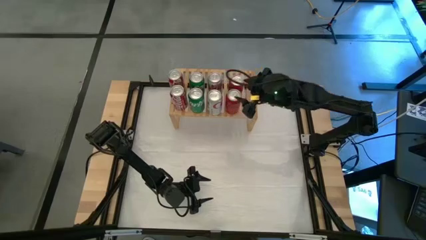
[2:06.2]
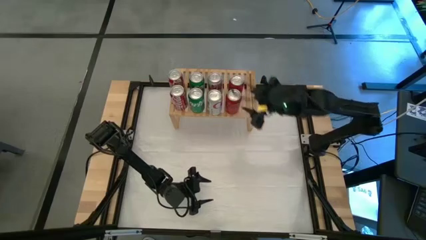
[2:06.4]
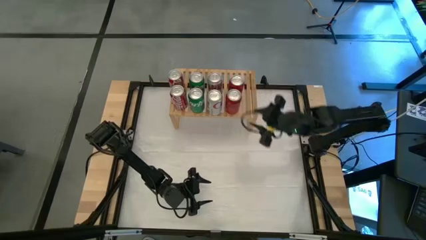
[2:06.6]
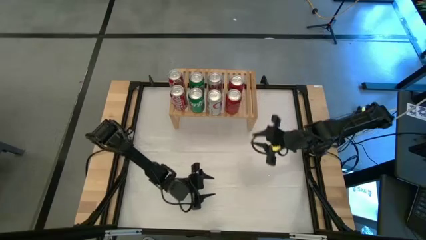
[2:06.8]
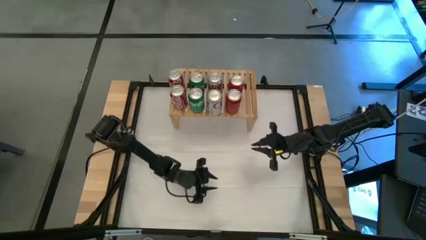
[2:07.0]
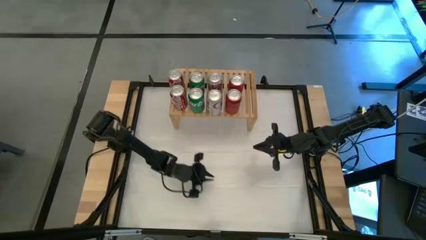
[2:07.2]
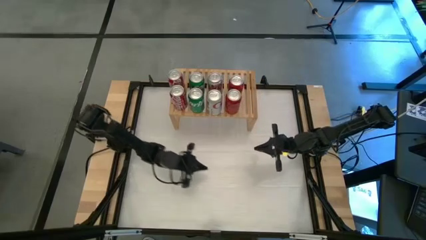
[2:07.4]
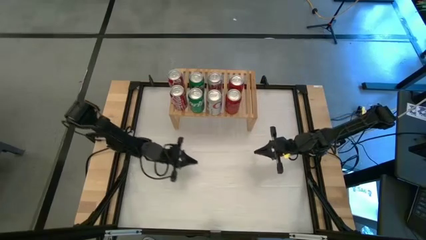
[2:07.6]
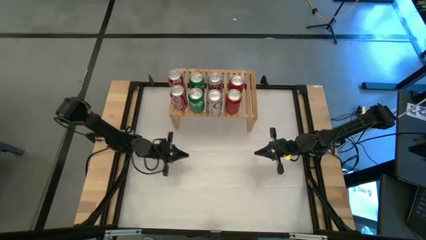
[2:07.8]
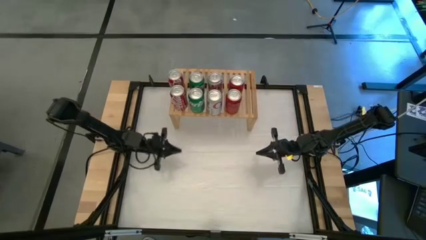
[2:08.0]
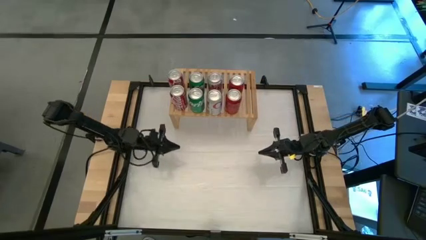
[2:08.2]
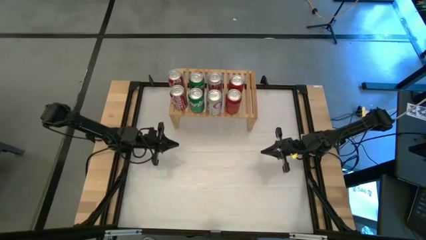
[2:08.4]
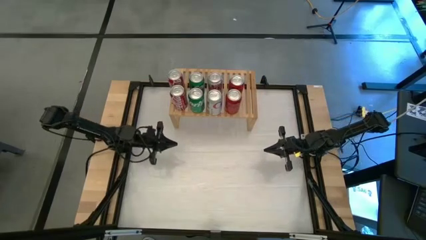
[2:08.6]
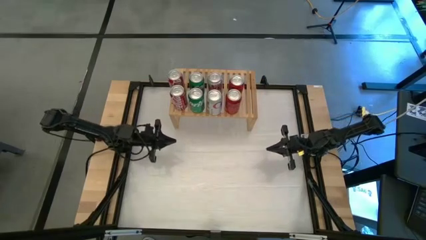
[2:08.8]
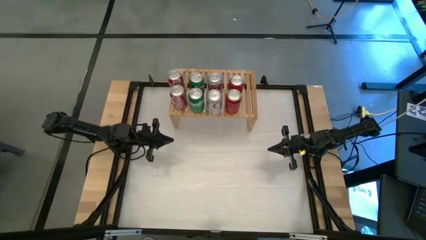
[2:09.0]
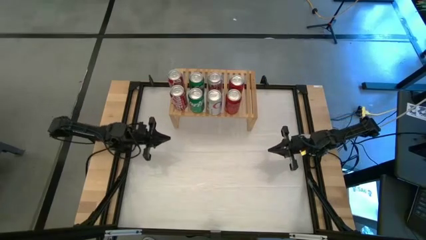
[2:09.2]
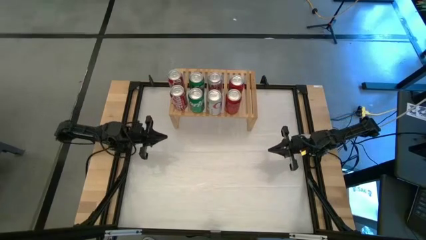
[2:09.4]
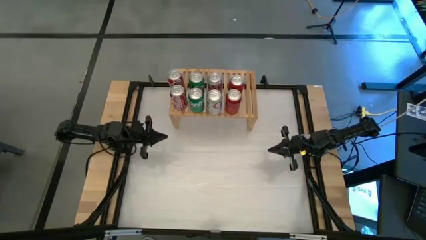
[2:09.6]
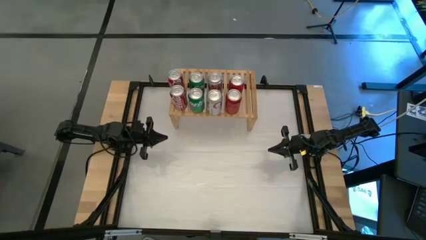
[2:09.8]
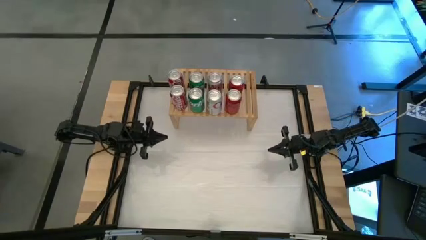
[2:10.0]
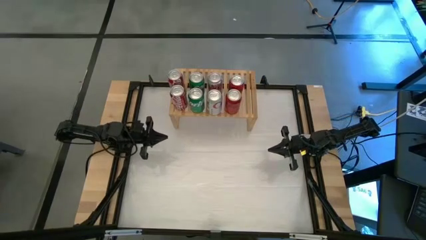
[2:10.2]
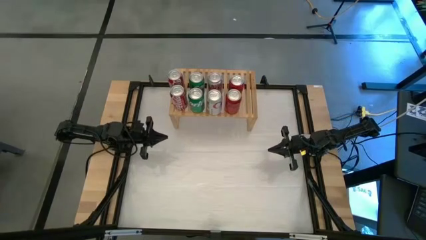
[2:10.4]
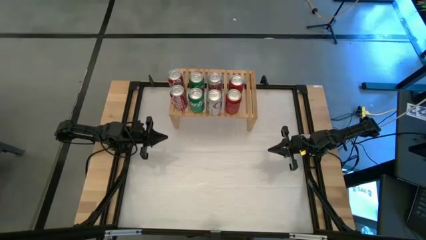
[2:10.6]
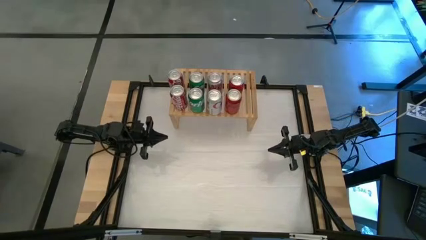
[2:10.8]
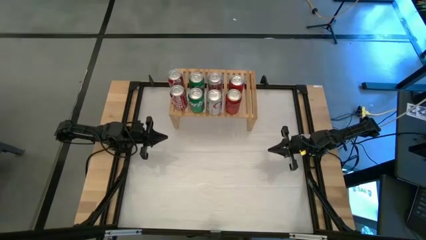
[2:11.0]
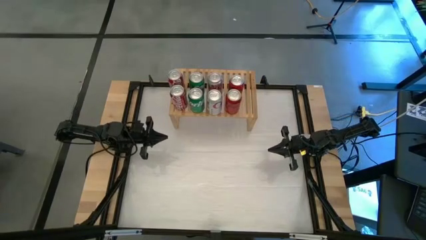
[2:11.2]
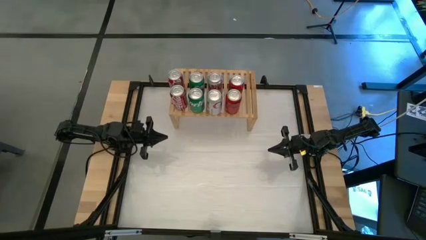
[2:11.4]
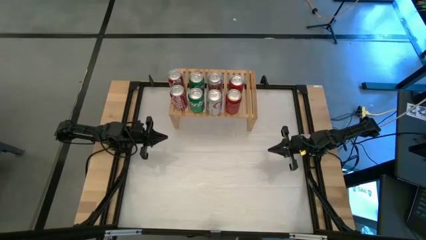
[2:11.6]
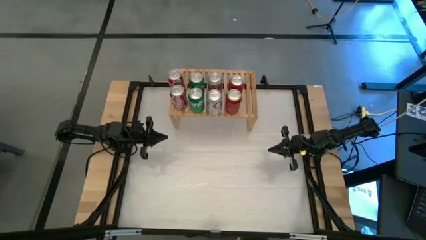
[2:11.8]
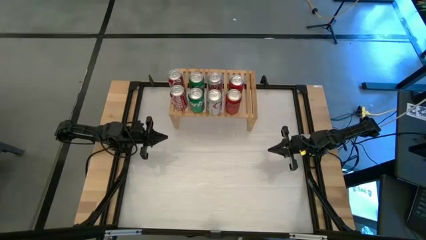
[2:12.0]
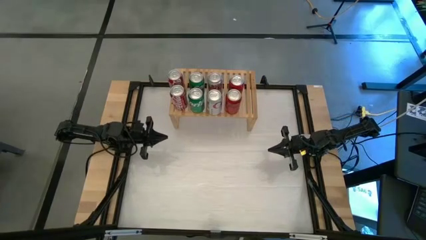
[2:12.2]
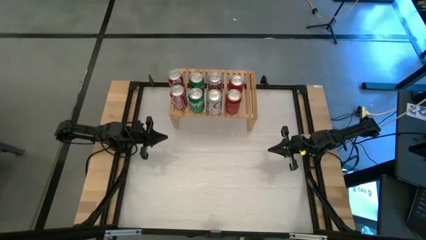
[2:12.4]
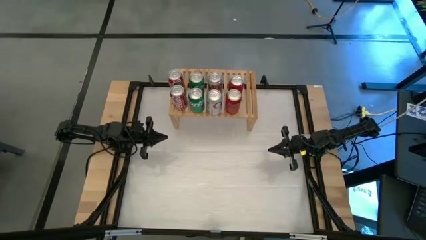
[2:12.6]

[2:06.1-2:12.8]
Task: Place canned beverage on shelf
Return to Home Position

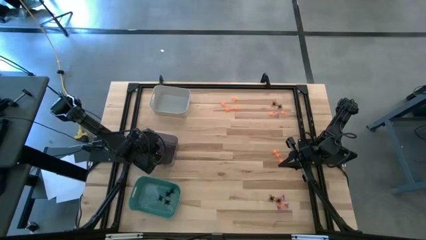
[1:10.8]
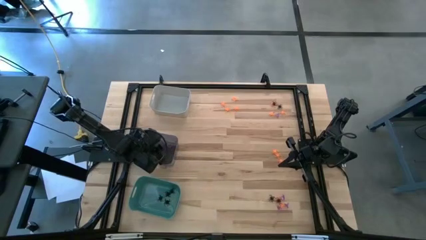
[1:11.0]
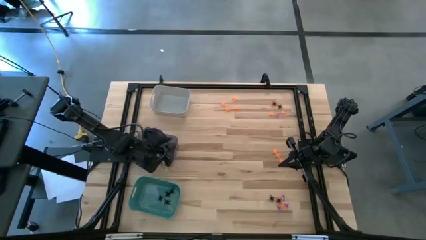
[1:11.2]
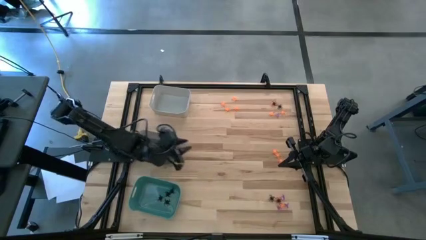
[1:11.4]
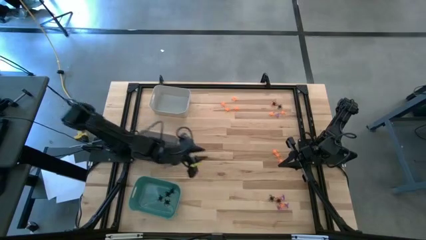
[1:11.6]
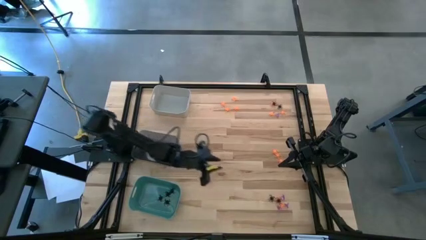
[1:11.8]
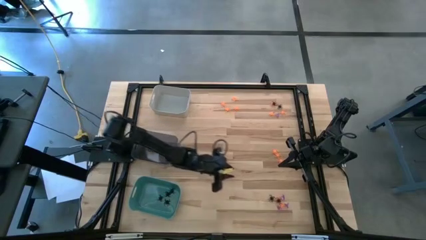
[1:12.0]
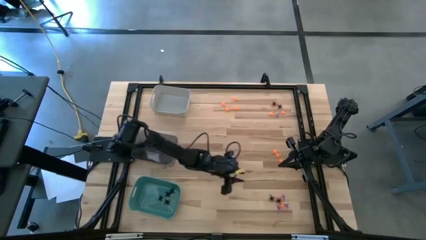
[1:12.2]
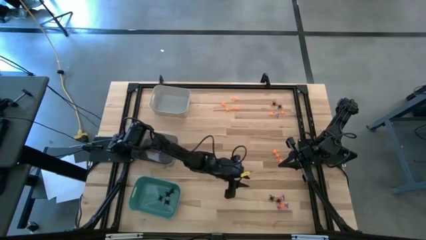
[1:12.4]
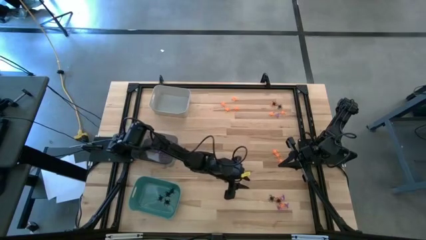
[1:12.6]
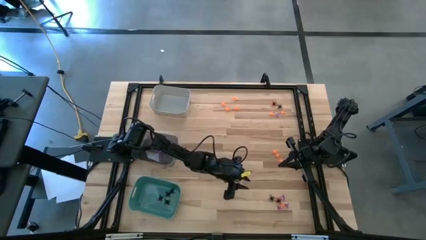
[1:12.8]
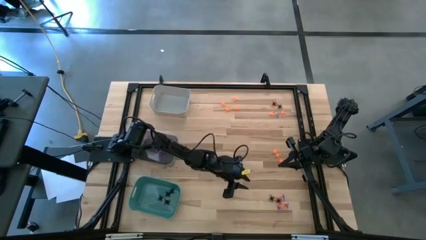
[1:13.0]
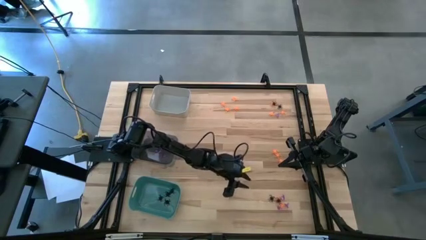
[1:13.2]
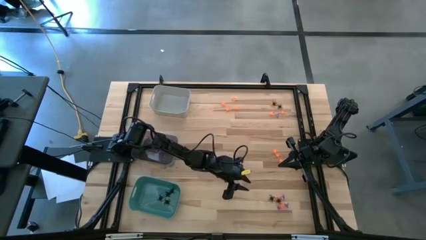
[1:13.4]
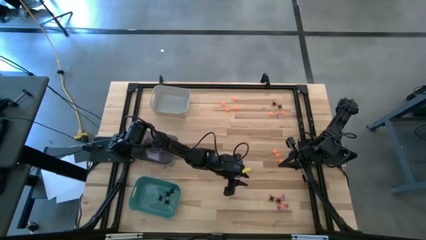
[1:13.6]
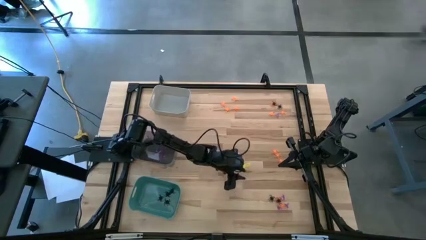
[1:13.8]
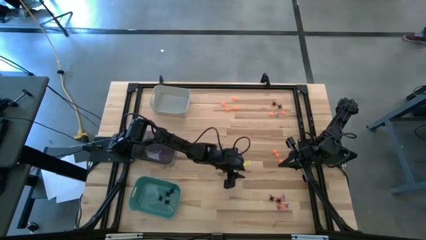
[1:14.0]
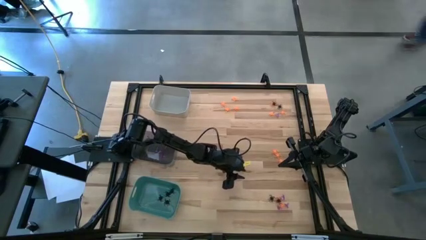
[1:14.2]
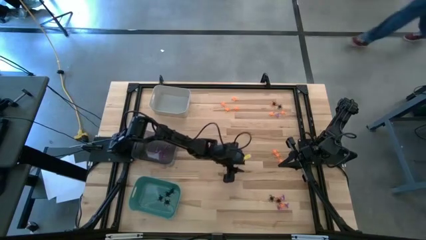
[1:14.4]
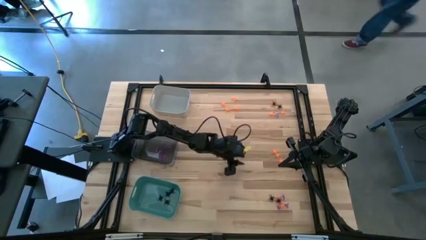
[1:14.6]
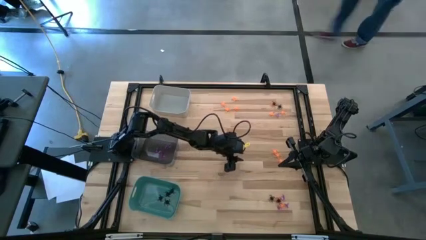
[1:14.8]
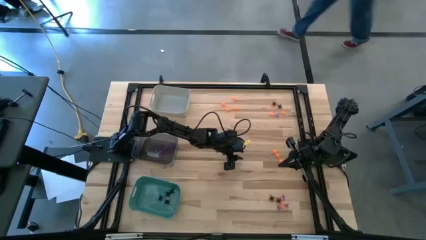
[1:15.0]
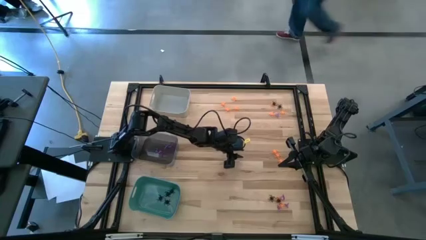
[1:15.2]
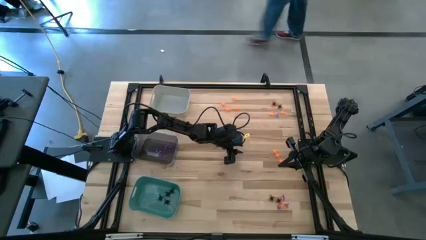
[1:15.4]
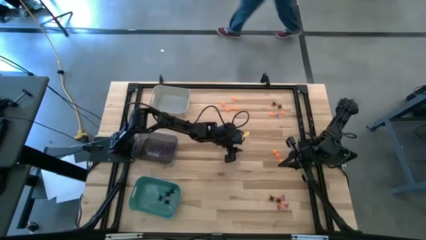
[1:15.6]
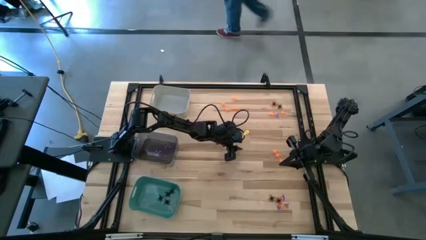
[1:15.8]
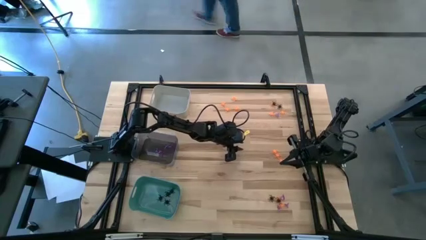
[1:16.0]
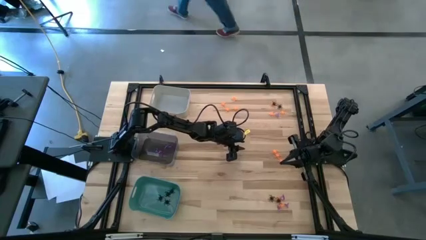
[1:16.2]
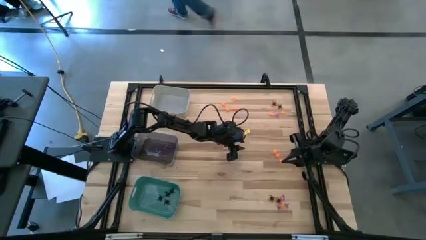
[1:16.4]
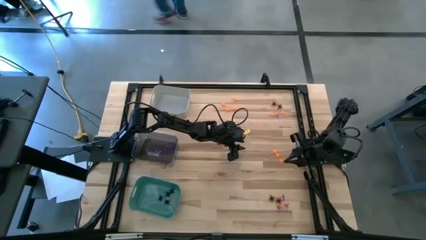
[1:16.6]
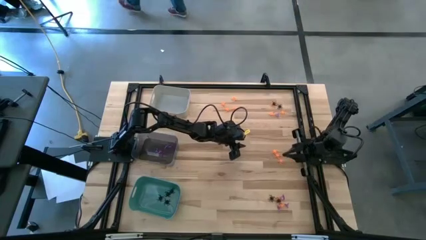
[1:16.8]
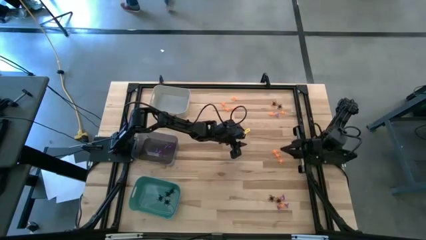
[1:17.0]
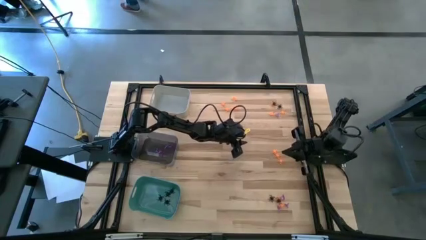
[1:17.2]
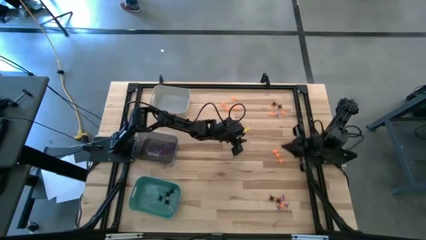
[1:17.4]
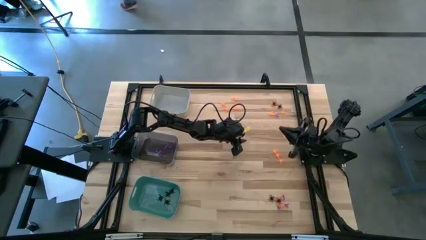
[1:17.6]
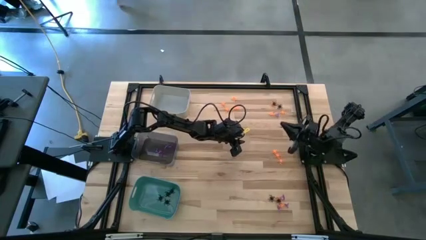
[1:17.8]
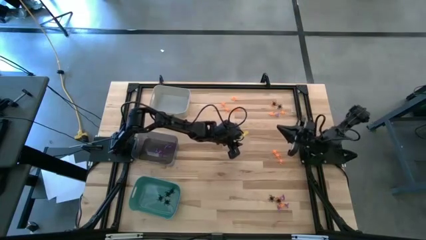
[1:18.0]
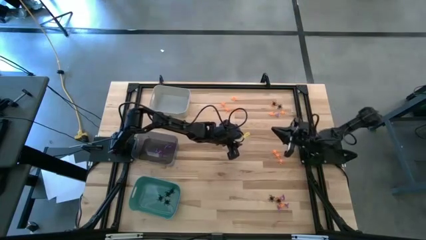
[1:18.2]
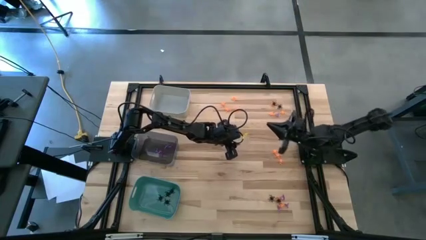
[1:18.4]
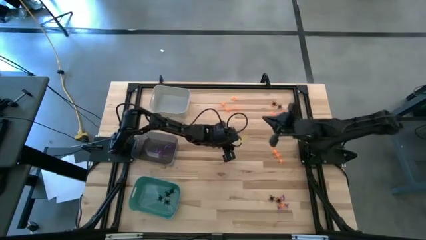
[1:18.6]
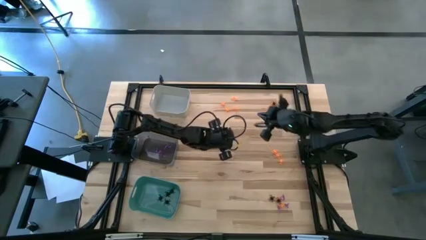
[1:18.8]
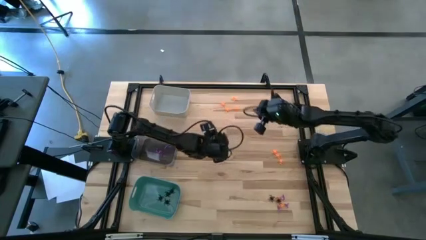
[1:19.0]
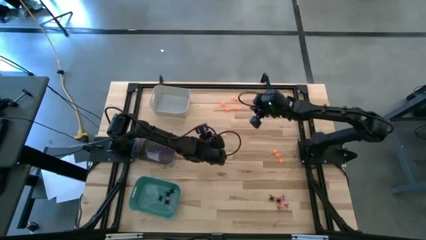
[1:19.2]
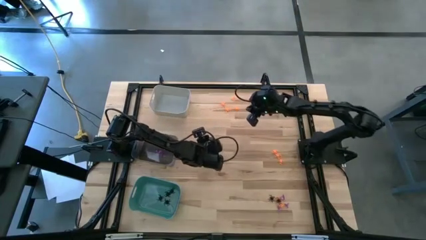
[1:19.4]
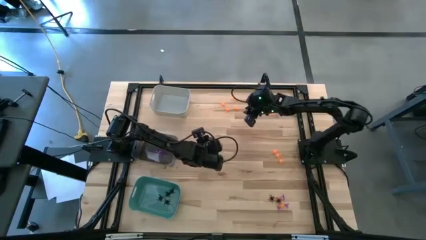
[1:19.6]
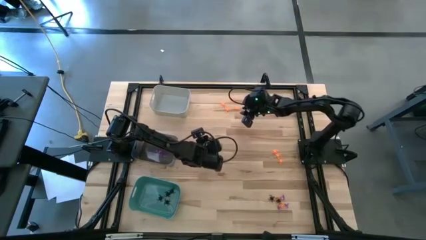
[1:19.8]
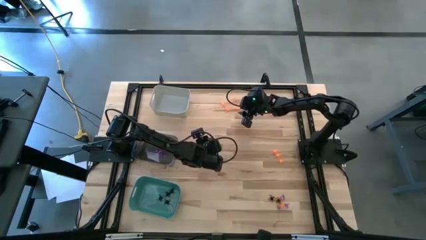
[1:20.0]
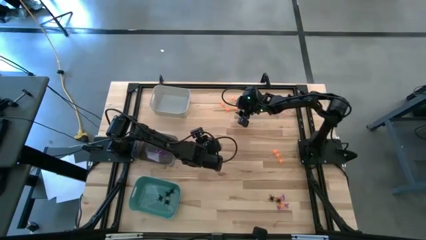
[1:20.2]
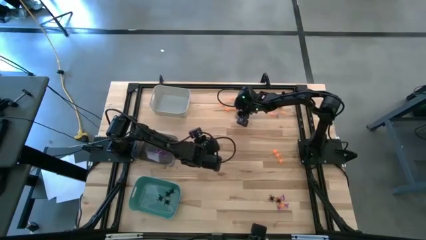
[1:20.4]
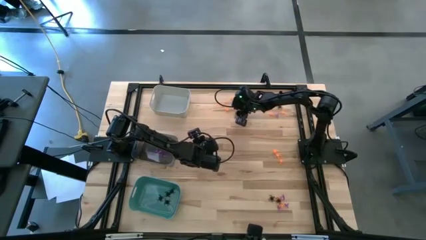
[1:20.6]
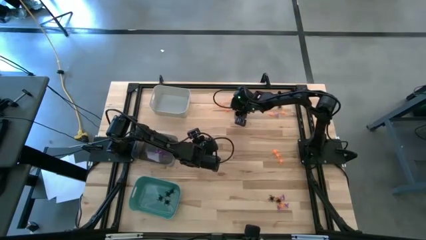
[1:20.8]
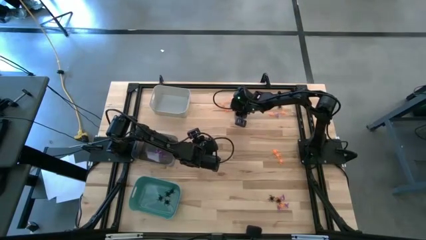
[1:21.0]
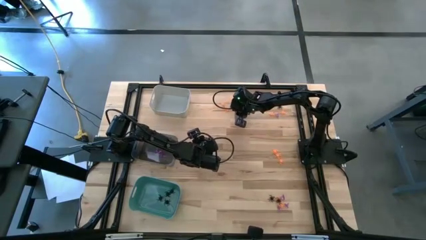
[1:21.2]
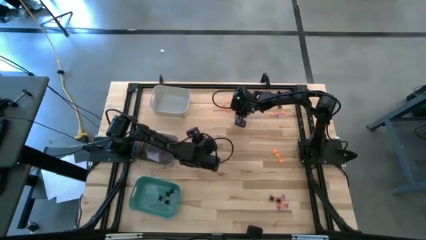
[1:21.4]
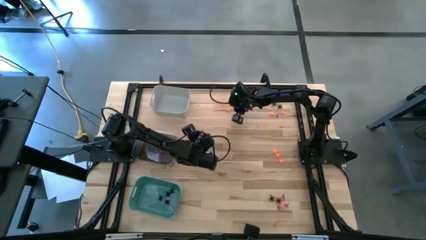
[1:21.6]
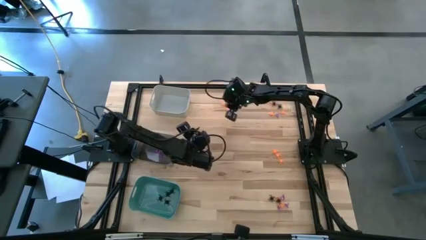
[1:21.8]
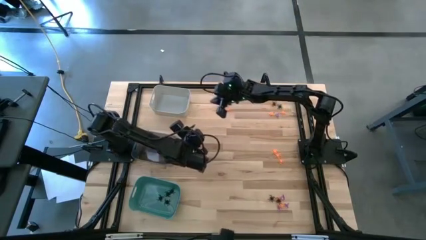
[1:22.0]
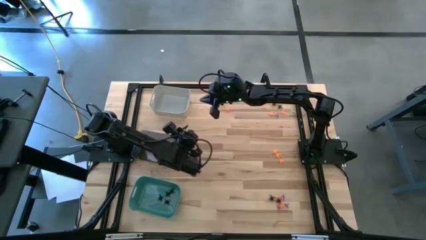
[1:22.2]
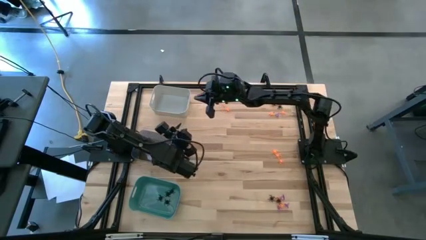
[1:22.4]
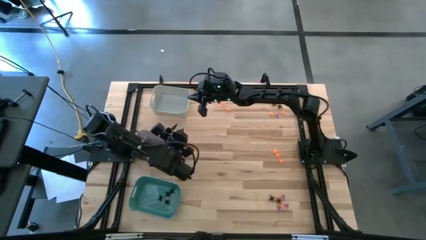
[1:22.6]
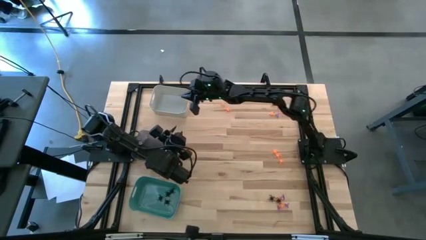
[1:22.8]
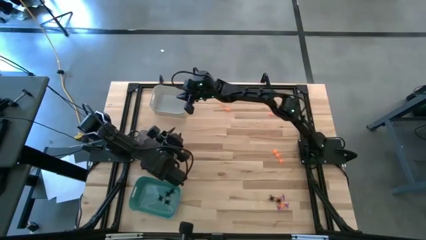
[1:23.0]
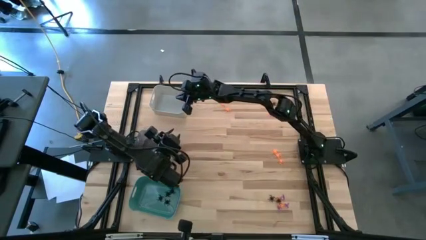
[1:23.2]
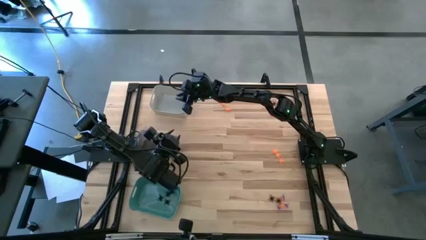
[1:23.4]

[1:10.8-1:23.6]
Task: Sort Halloween decoration
Put the top center orange spider into the gray bin
